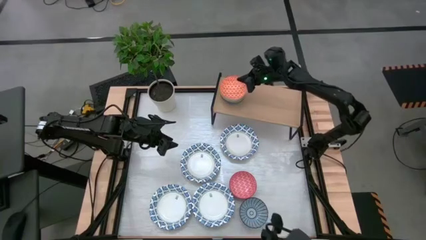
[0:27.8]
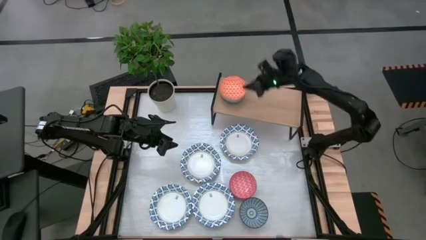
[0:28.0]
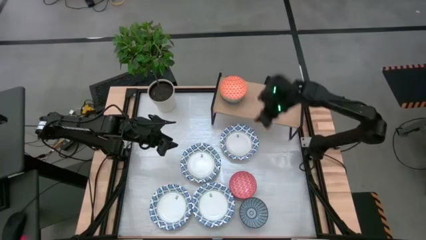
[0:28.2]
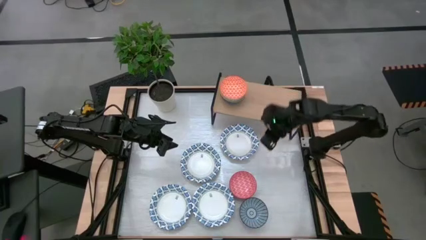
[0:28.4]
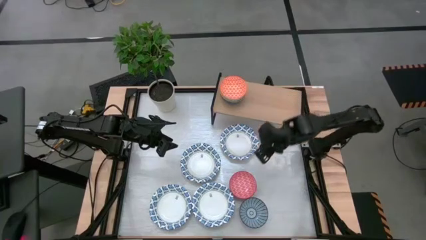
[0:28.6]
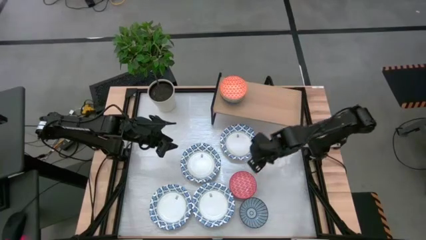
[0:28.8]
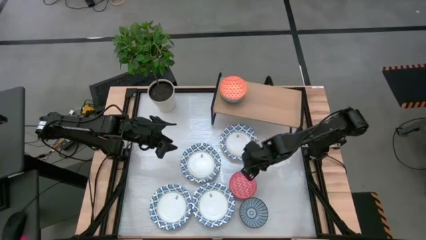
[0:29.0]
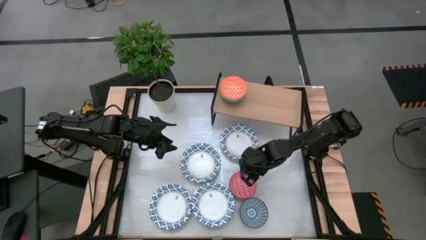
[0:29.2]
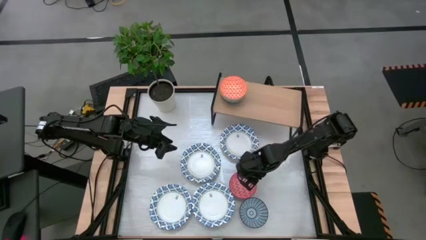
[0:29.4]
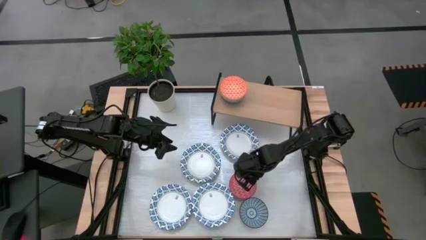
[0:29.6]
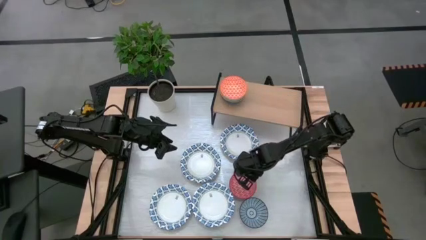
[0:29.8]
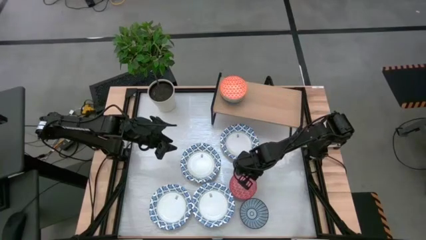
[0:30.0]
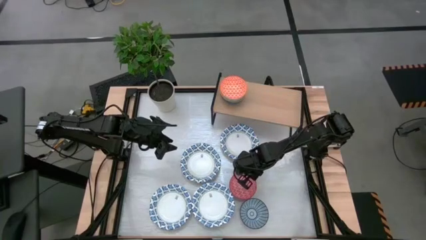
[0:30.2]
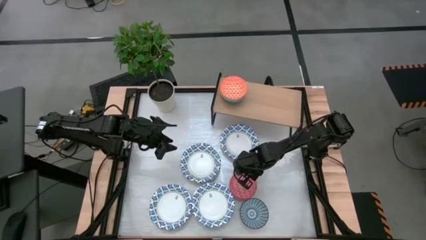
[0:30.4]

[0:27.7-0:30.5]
Task: Place and stack bowls onto a shelf
Stack the red bowl on top of the orange bowl on the shelf

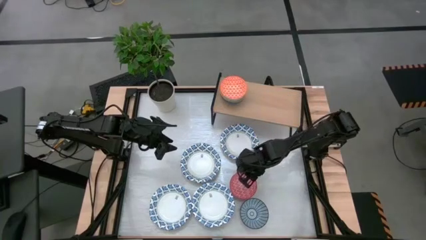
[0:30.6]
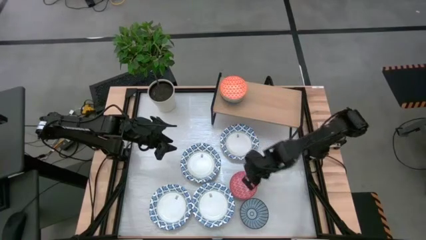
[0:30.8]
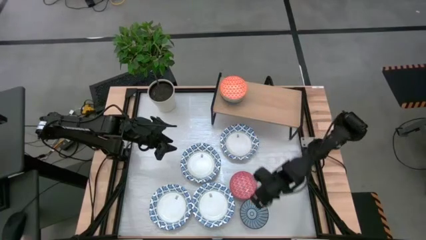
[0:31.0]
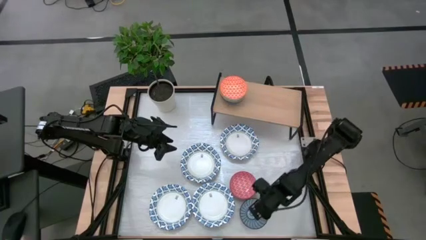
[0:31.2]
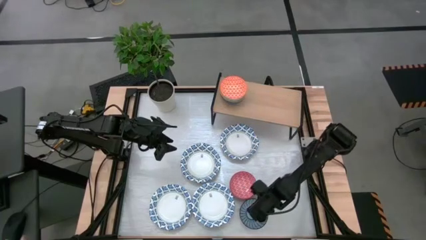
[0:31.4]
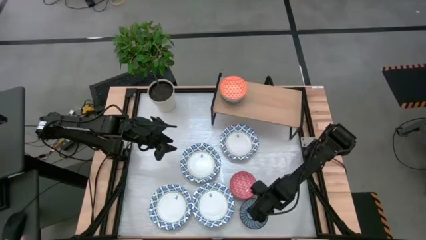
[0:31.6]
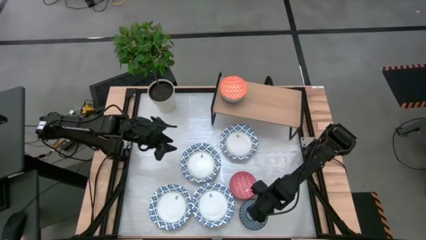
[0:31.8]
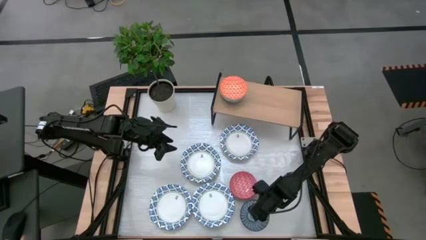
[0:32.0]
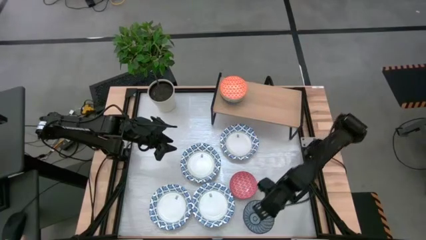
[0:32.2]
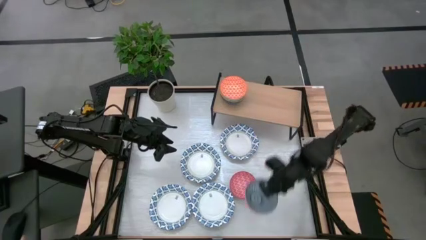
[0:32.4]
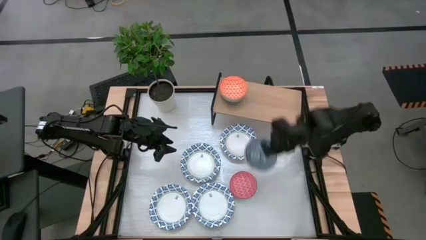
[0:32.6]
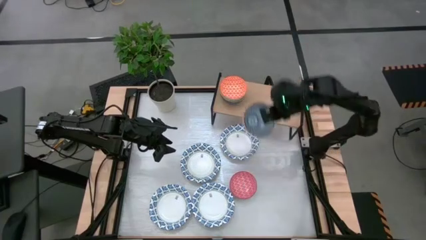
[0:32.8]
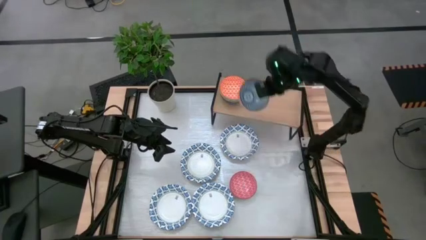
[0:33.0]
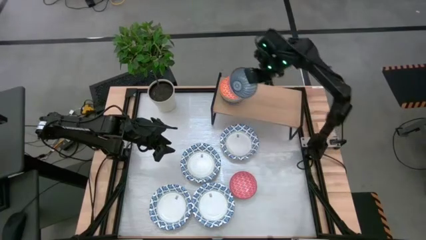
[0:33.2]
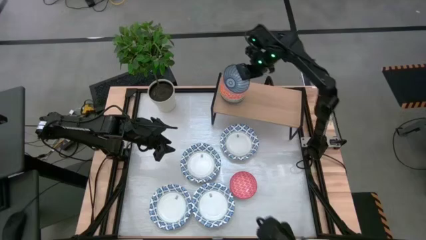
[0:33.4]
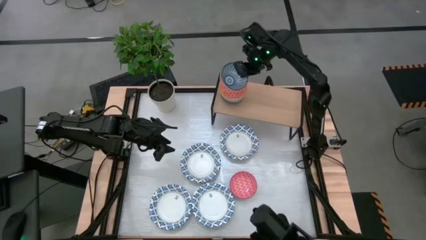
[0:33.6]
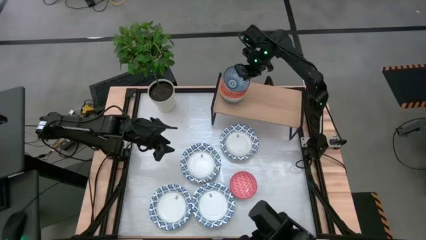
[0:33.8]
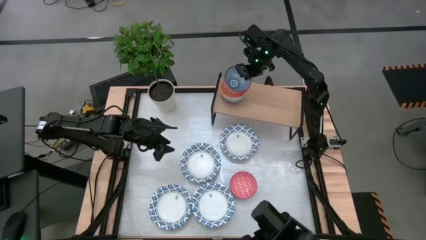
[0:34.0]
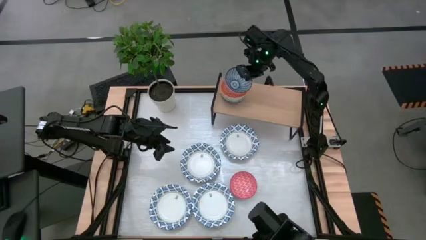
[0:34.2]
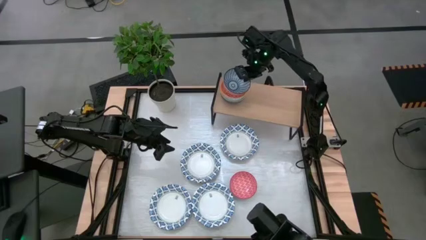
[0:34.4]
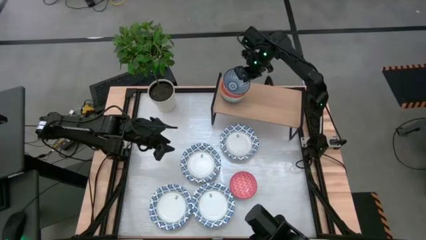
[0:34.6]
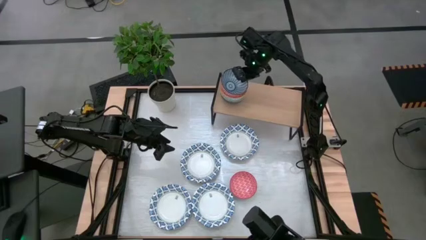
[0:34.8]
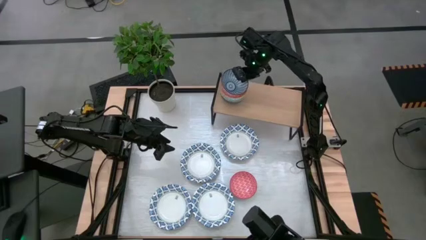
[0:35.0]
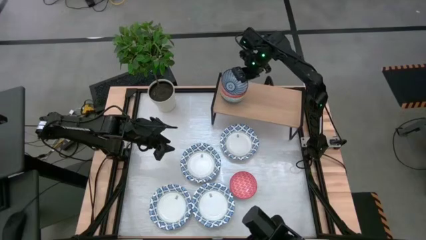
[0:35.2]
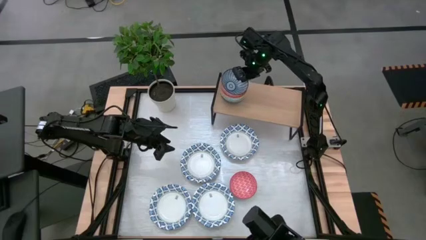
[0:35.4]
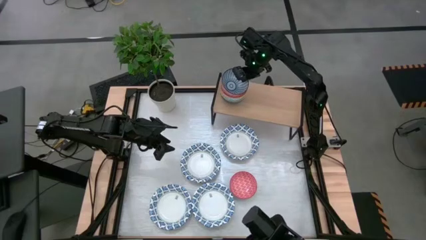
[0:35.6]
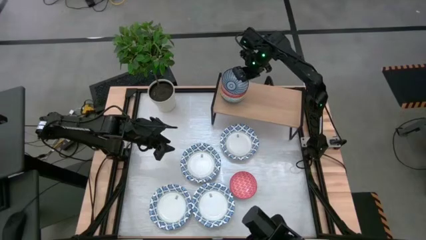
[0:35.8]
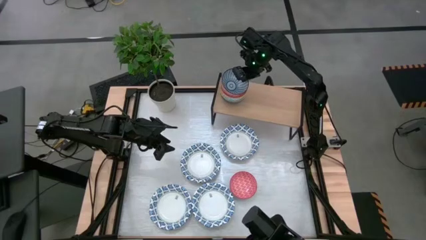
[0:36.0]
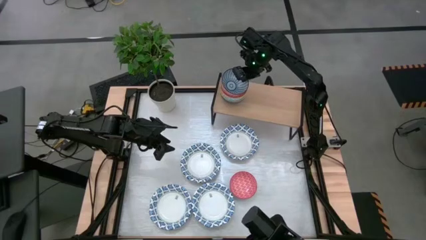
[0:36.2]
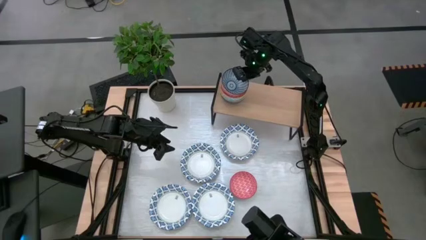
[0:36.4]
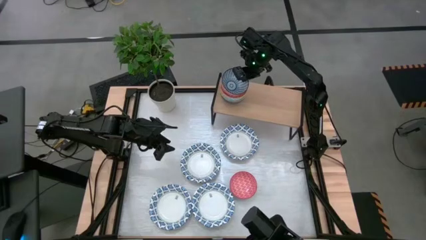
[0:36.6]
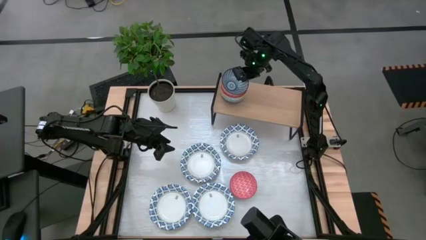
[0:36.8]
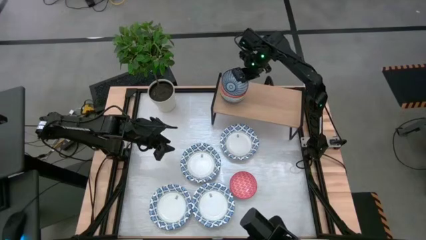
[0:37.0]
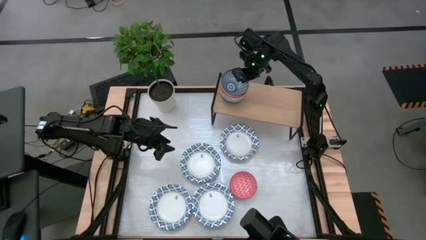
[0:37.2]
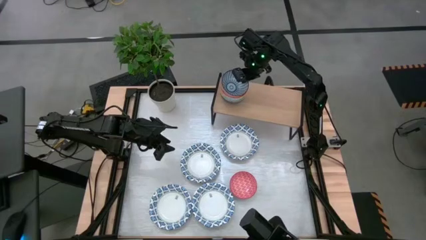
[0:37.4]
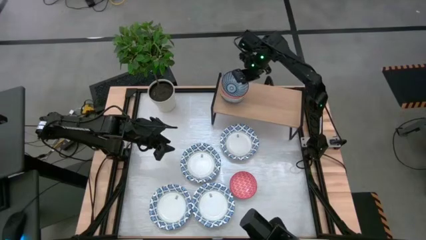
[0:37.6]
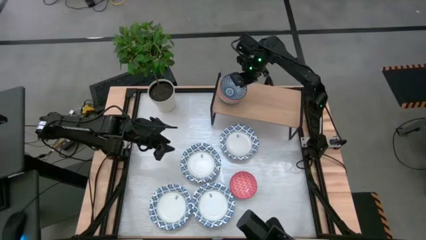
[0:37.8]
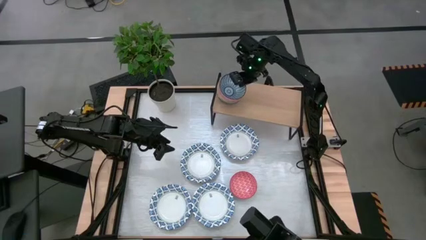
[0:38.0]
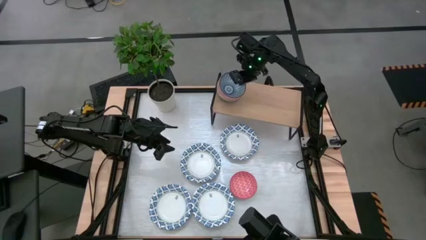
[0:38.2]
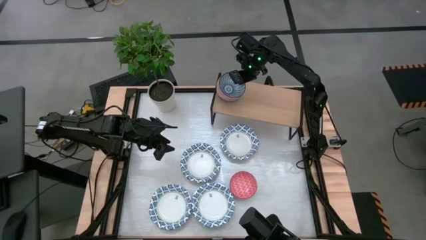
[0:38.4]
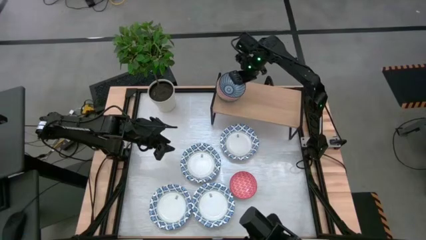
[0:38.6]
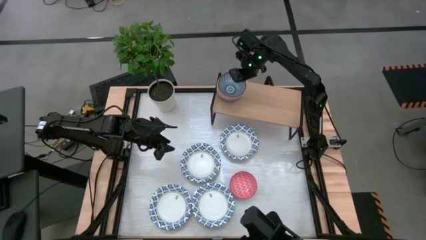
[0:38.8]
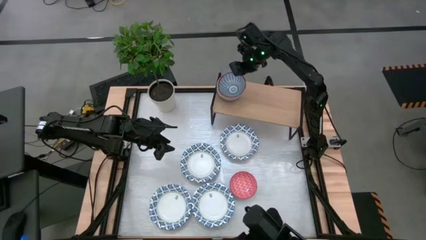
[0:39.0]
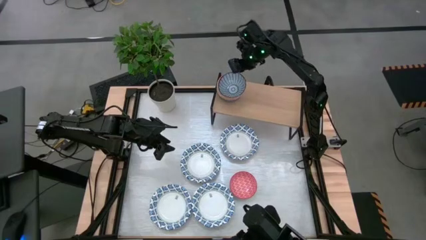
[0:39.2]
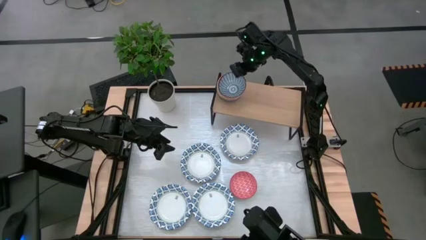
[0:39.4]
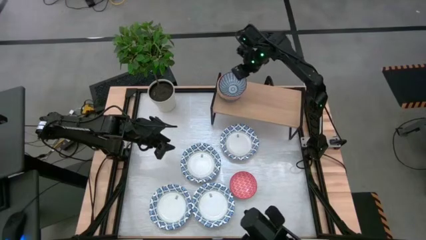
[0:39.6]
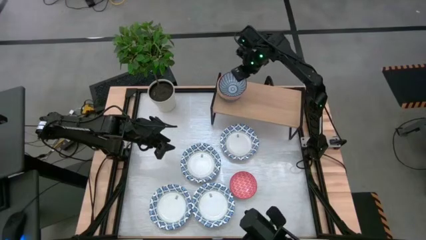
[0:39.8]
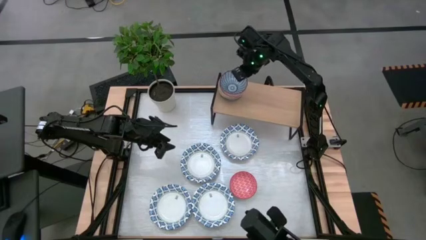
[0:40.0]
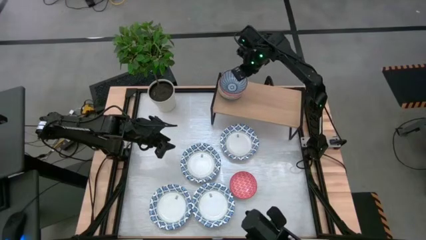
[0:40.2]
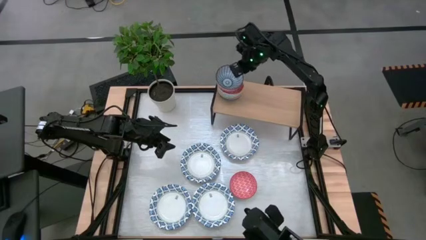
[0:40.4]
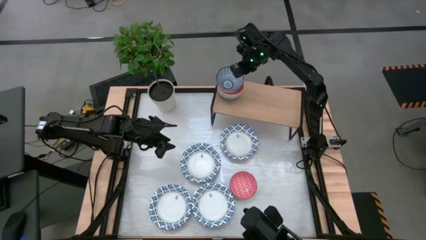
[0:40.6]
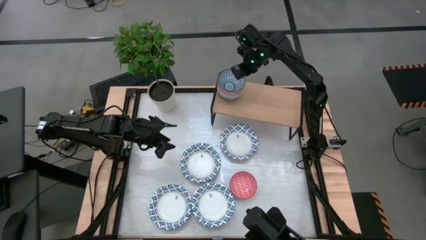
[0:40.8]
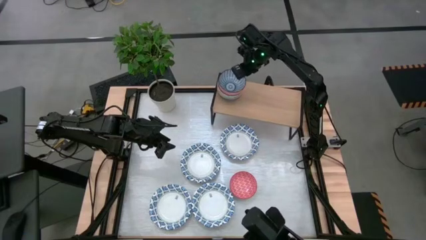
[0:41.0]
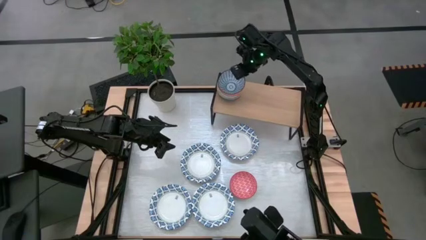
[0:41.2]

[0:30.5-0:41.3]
Stack the blue bowl on top of the orange bowl on the shelf

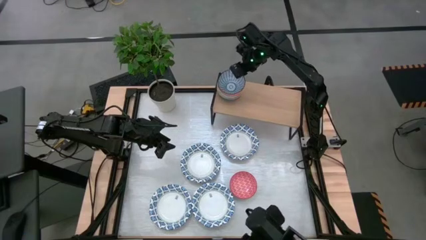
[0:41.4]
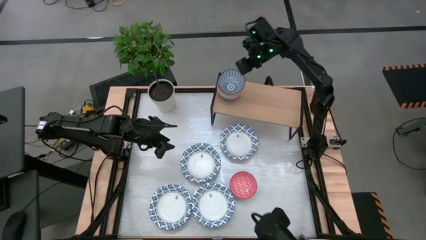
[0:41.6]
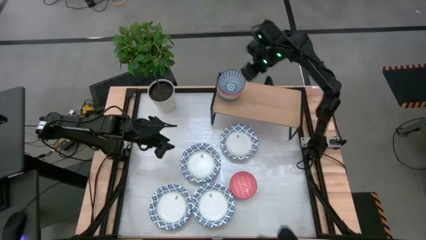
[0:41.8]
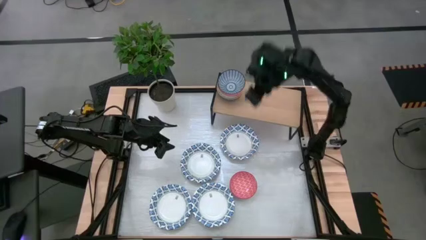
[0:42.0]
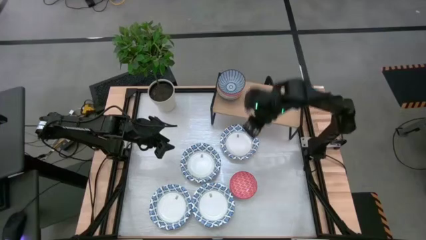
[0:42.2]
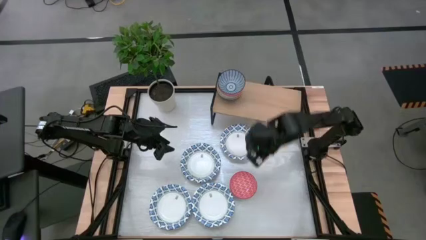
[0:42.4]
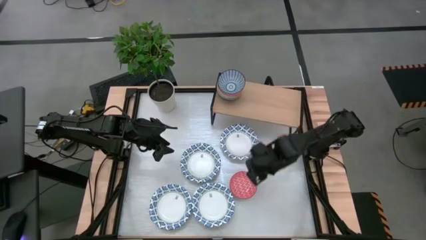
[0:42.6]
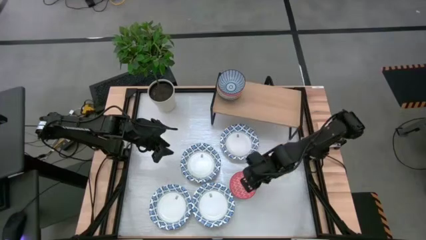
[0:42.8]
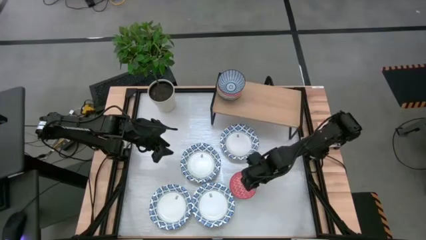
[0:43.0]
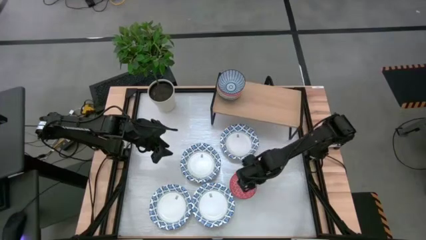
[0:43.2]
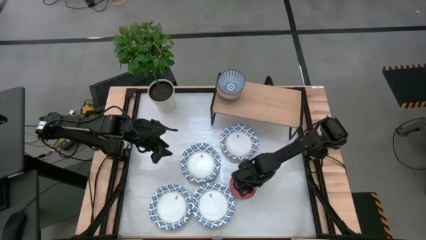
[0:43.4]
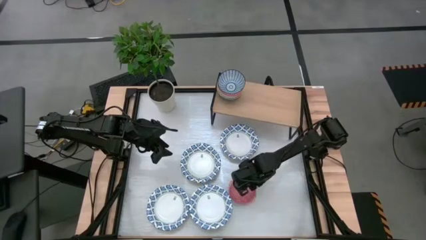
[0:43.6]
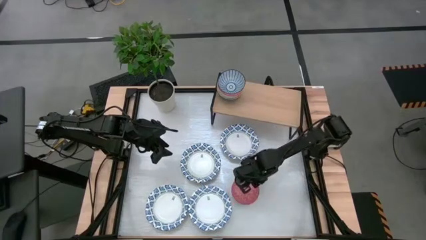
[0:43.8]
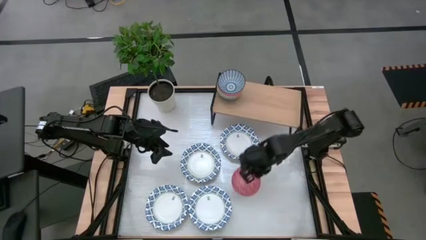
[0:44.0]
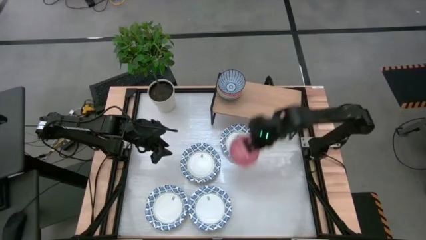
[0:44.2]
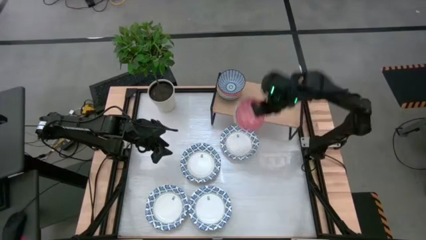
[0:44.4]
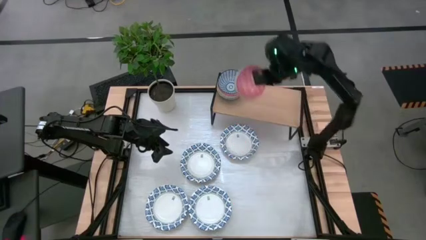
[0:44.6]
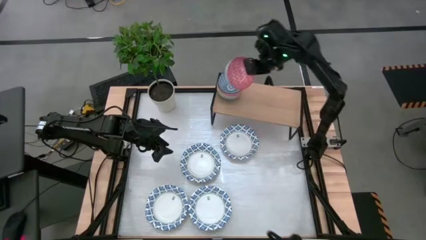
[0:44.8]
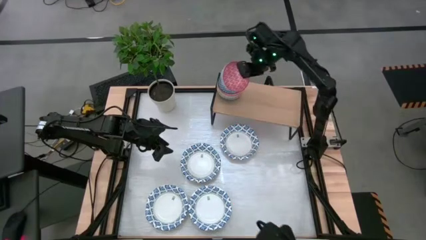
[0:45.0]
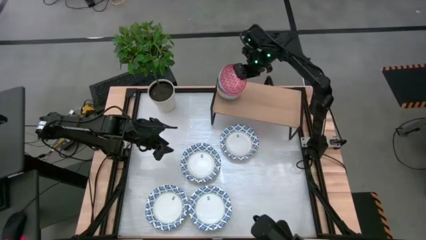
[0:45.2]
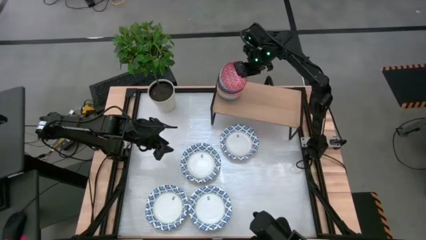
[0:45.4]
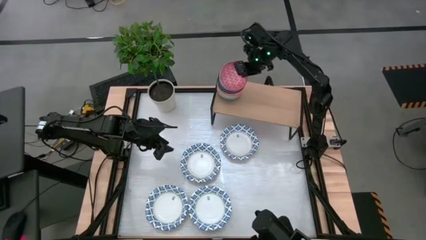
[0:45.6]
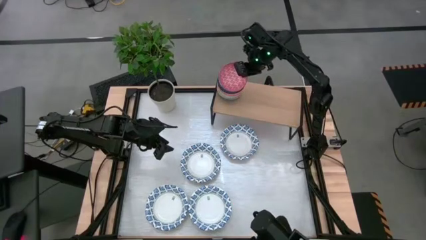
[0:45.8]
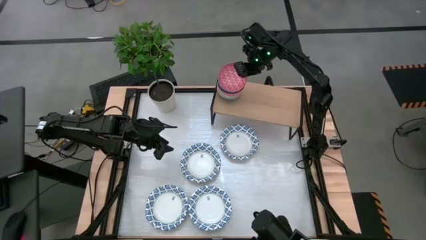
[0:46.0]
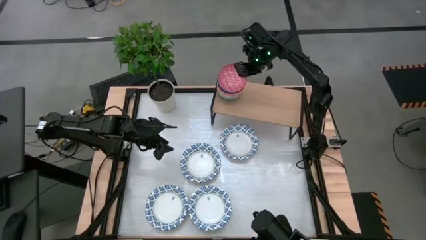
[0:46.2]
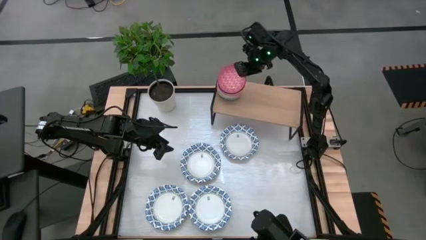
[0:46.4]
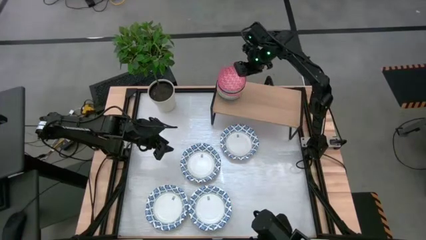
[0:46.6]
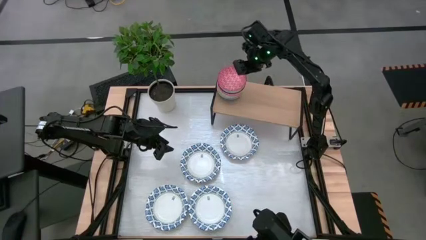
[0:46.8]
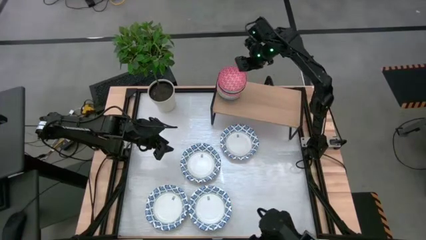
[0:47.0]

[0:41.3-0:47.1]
Stack the red bowl on top of the blue bowl on the shelf
